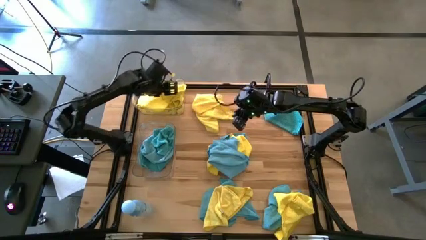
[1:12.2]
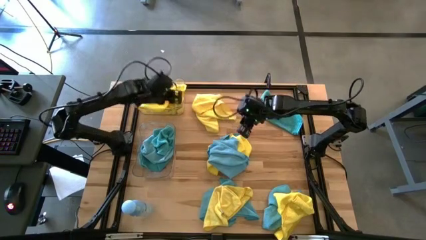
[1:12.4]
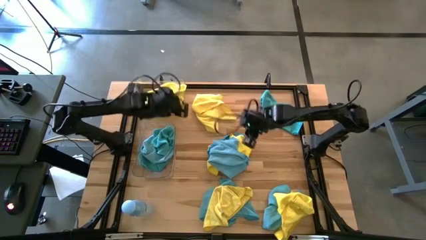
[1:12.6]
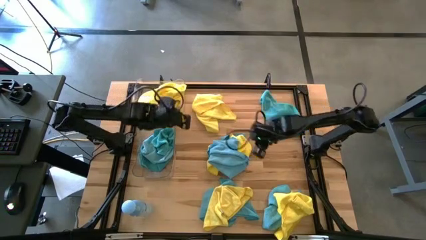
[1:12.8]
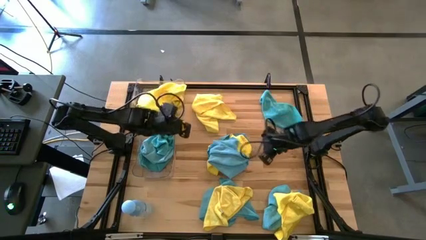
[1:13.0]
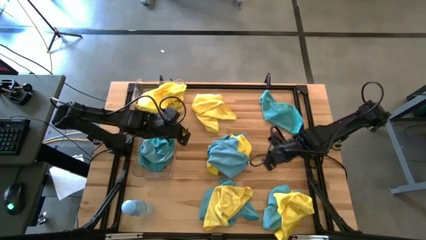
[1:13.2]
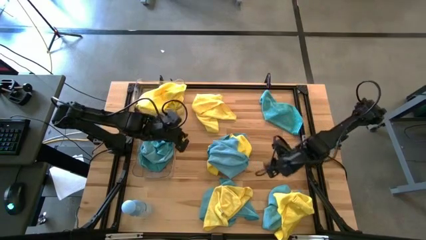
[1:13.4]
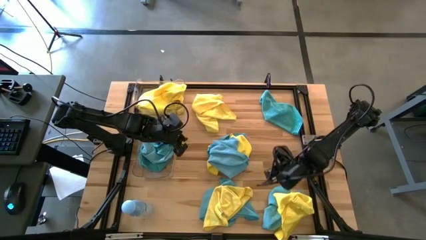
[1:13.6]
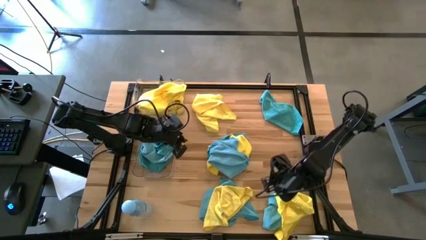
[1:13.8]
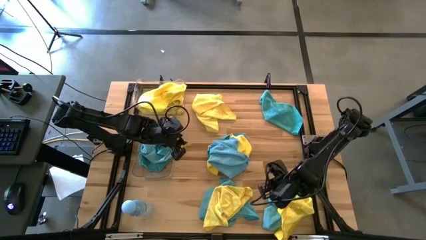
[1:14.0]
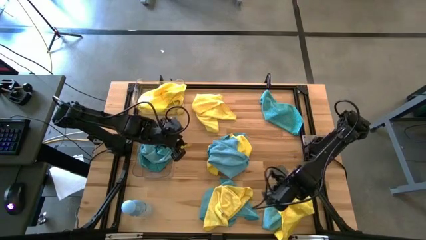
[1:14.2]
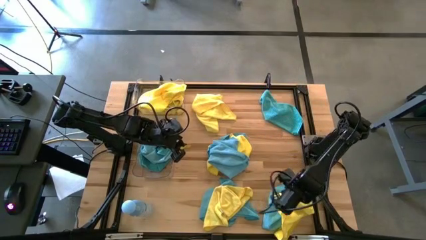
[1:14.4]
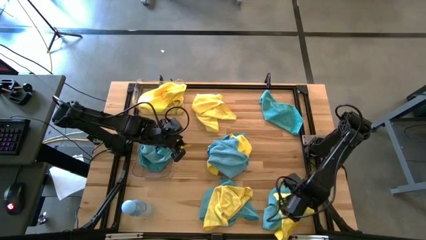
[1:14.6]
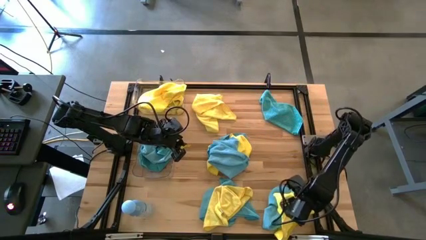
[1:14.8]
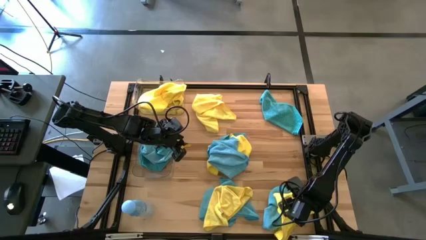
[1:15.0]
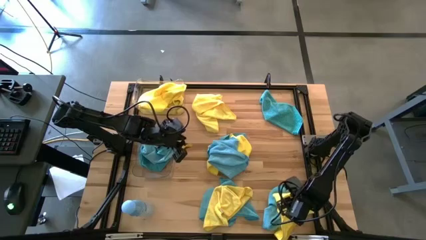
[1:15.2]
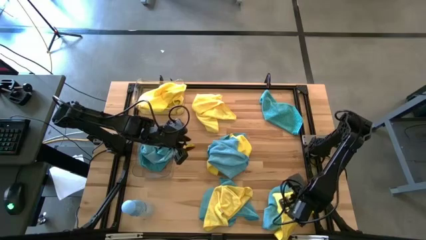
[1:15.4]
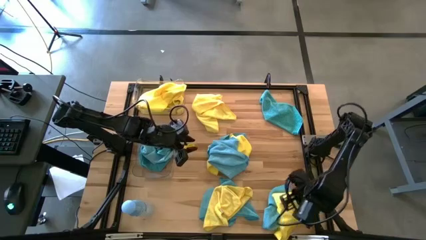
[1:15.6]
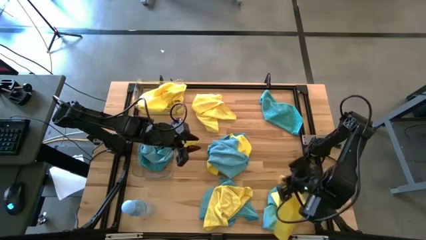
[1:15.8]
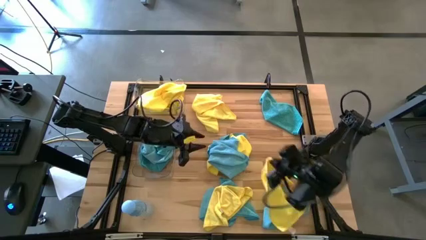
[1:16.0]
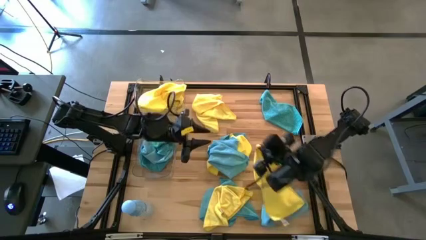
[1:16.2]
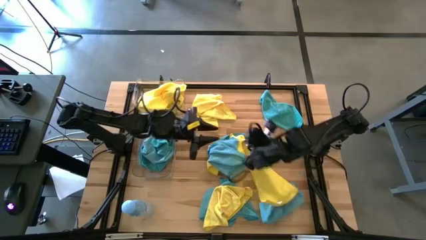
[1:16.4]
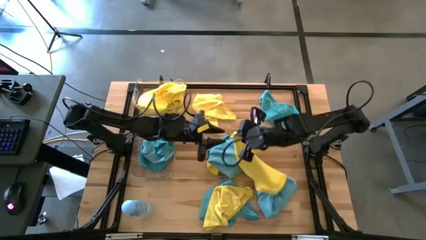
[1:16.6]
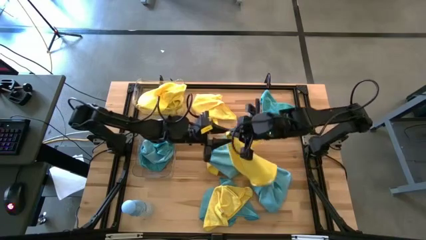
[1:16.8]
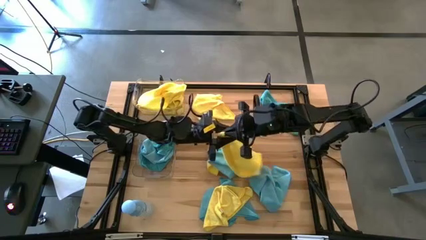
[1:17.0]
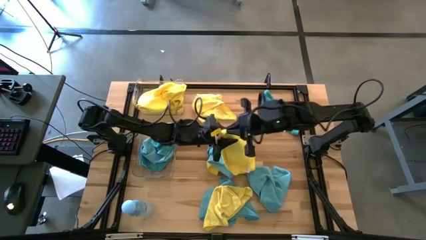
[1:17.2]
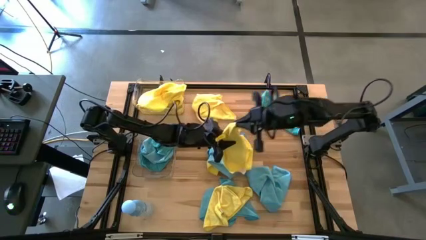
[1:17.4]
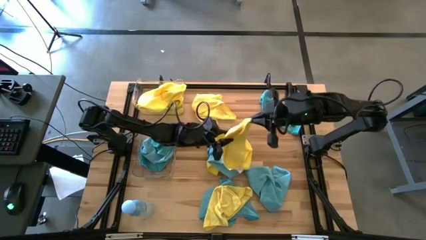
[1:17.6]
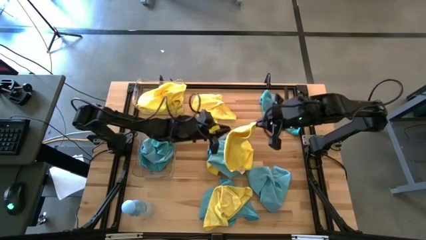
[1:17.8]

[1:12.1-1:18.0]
Task: Sort microfiber towel by color & place in baskets
Put the yellow microfiber cloth into the top transparent bin

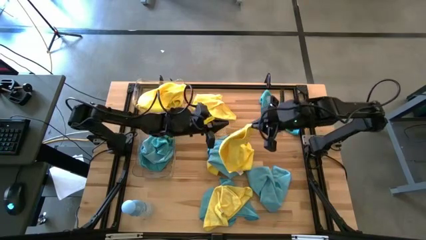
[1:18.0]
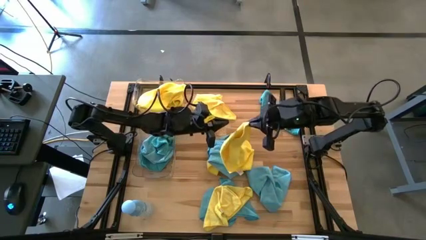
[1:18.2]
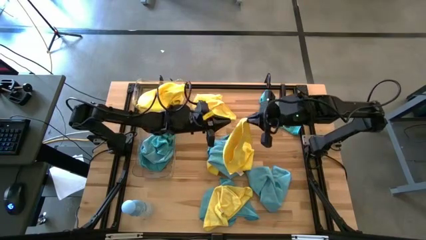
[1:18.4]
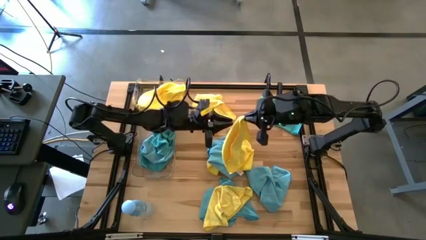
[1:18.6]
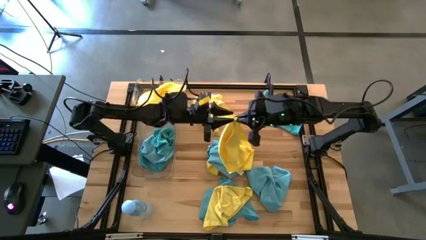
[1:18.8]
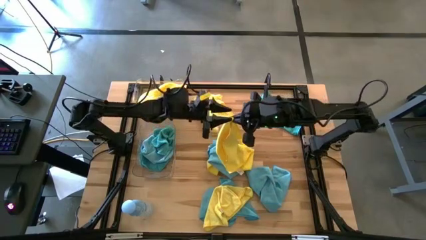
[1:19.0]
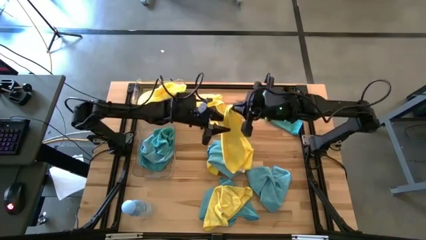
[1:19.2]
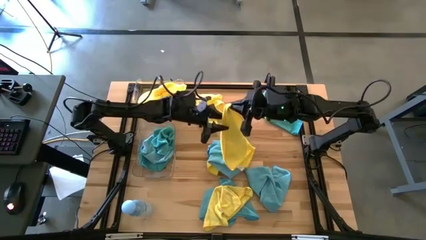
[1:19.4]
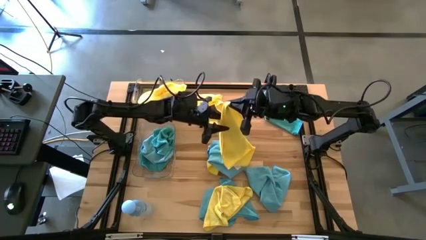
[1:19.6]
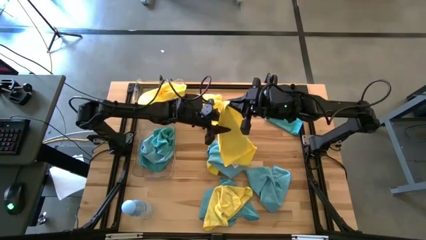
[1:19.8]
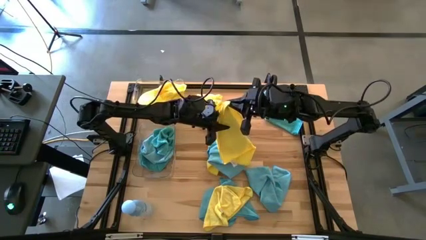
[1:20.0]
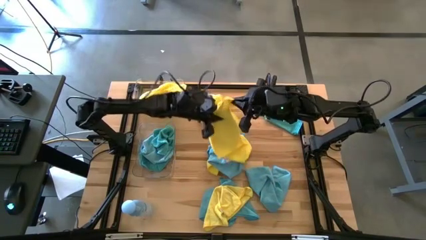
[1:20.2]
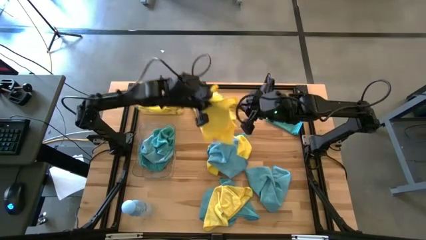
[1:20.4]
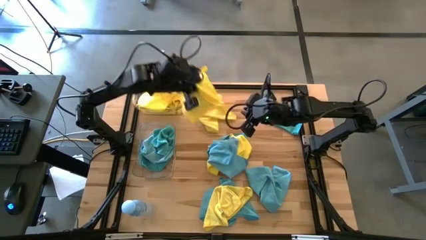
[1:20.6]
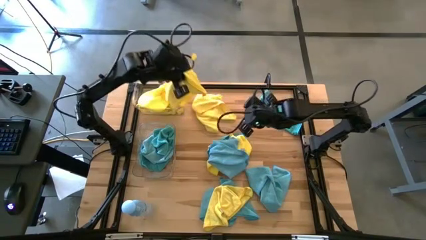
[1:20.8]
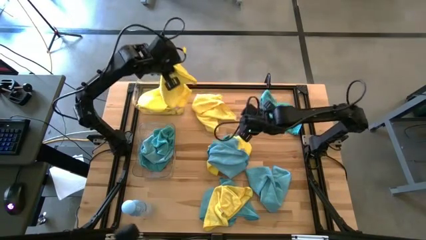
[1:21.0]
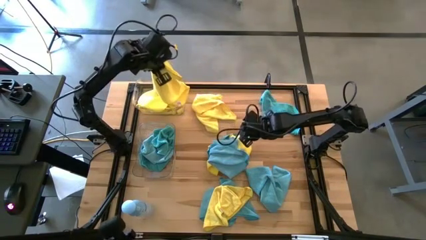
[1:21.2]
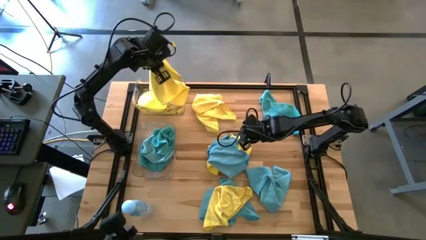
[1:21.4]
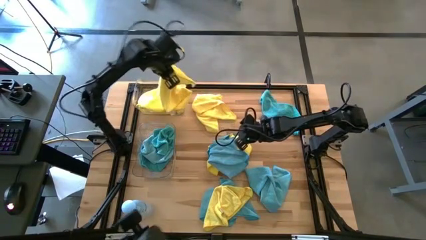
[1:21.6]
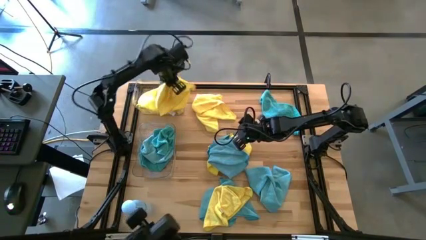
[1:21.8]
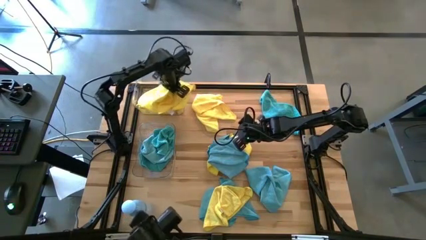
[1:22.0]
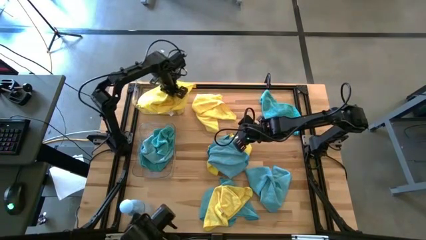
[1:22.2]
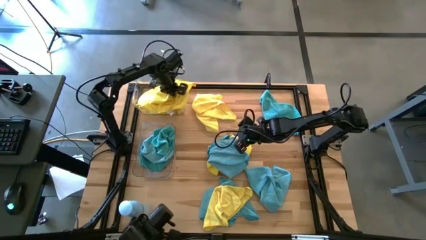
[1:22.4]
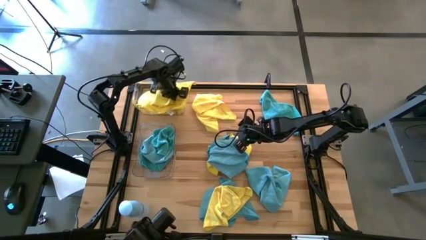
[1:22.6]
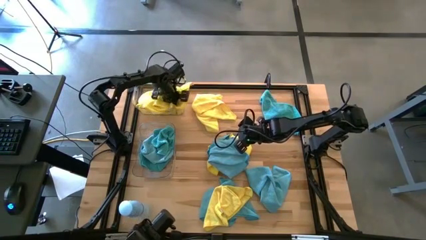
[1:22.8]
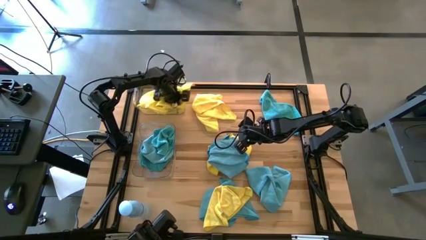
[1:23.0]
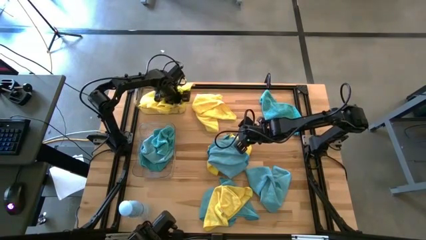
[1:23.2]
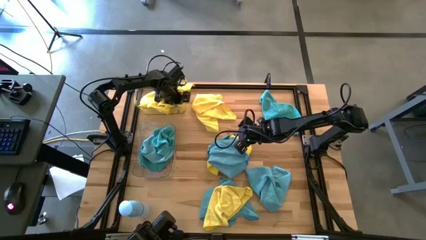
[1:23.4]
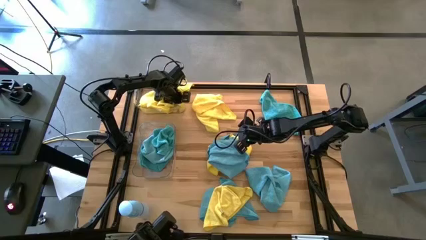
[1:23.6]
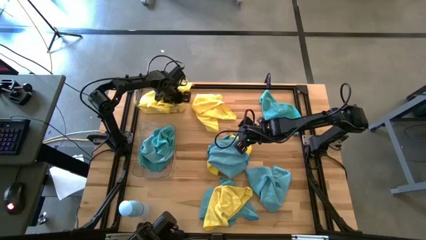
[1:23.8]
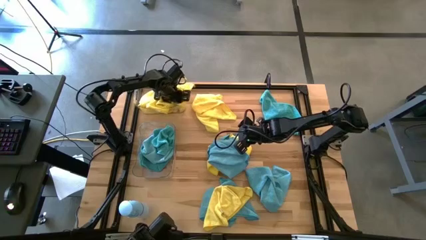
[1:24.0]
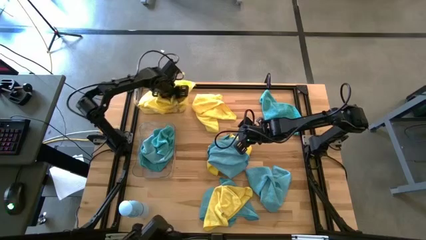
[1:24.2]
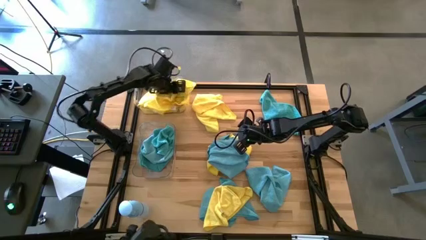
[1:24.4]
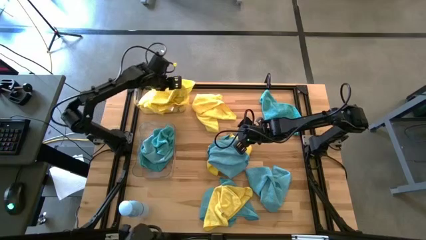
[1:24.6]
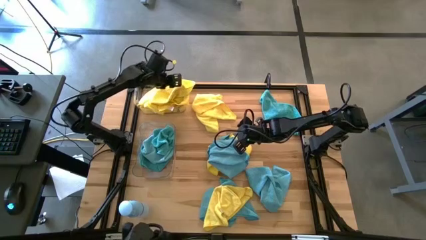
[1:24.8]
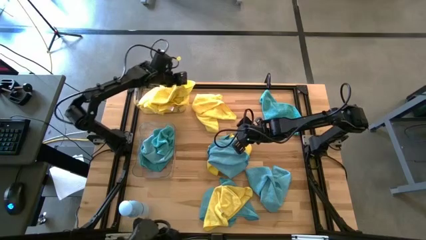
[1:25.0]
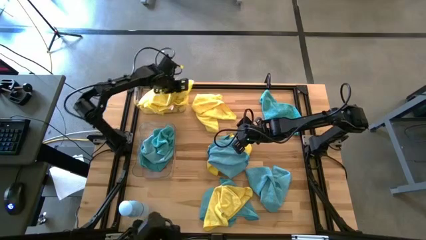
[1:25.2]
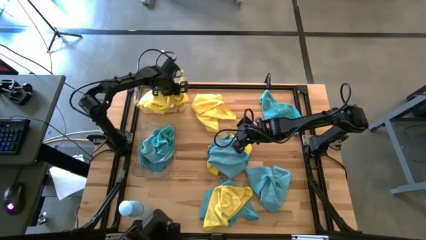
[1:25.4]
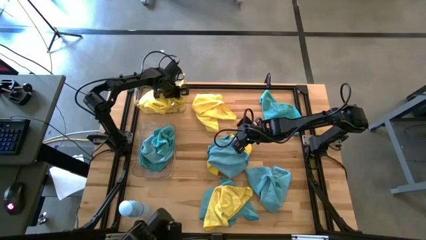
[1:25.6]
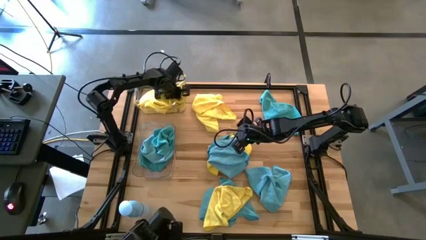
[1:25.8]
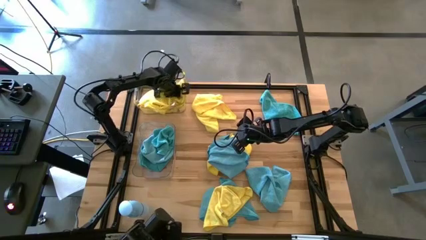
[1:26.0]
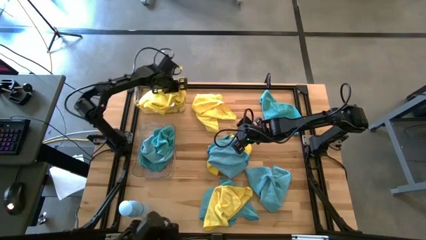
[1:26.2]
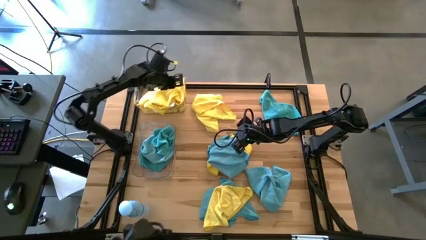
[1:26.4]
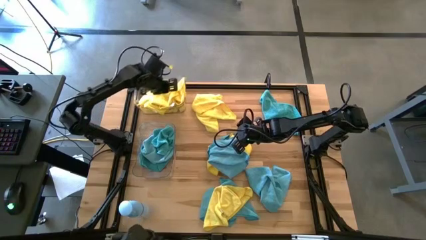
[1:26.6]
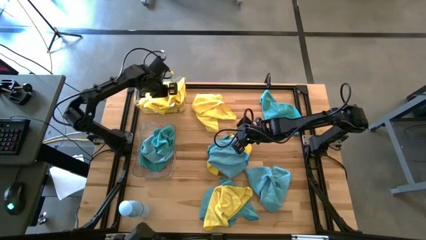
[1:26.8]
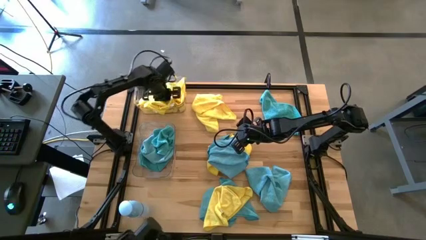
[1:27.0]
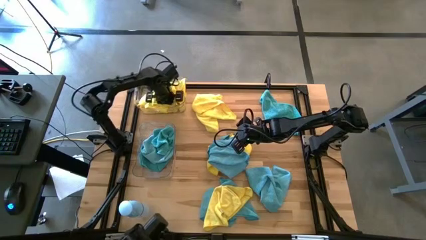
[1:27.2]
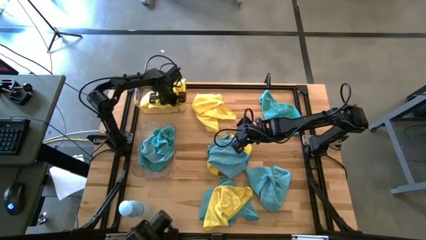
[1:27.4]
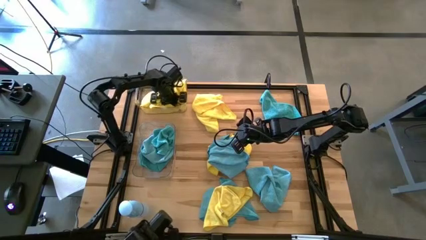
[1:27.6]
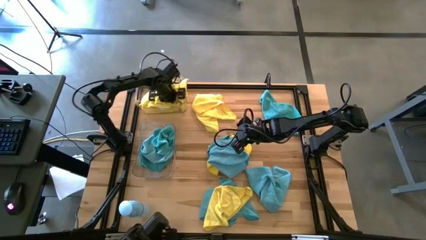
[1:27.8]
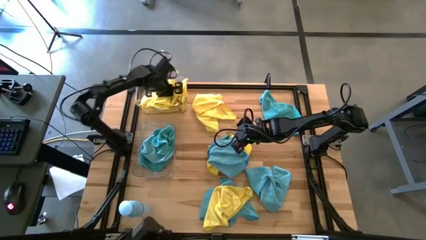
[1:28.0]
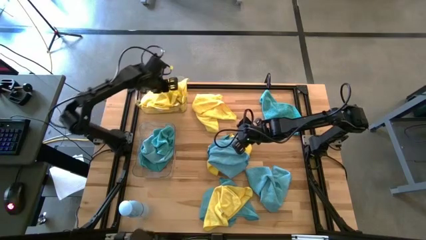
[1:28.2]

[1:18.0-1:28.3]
Put the yellow microfiber cloth into the top transparent bin
